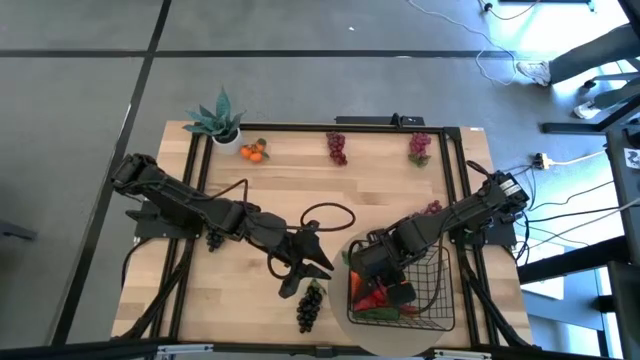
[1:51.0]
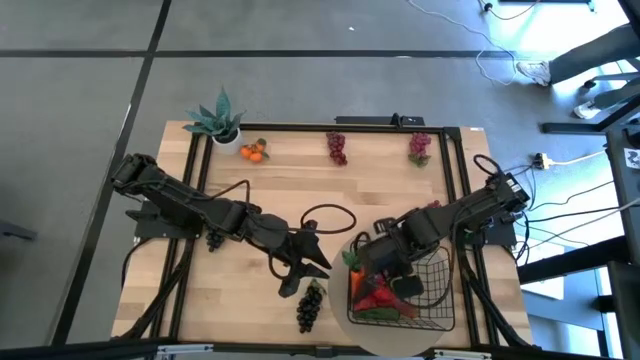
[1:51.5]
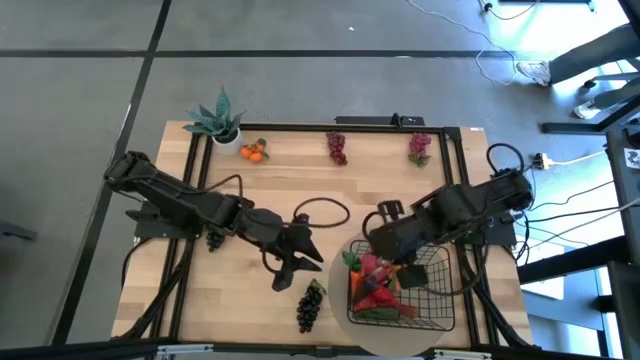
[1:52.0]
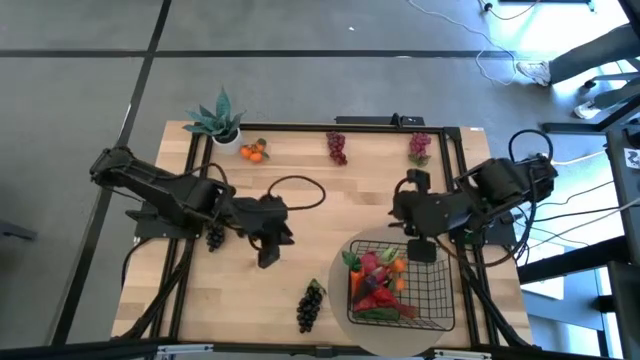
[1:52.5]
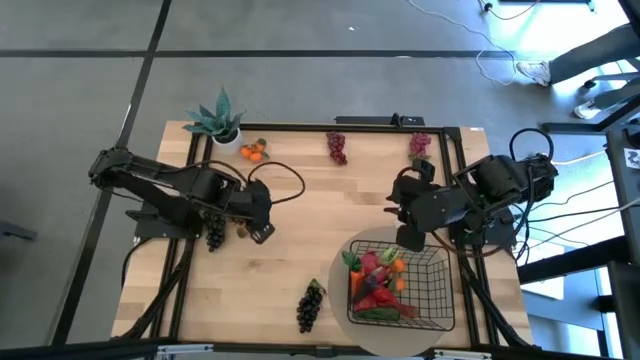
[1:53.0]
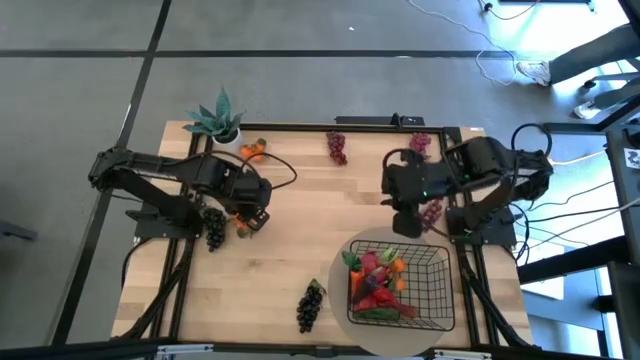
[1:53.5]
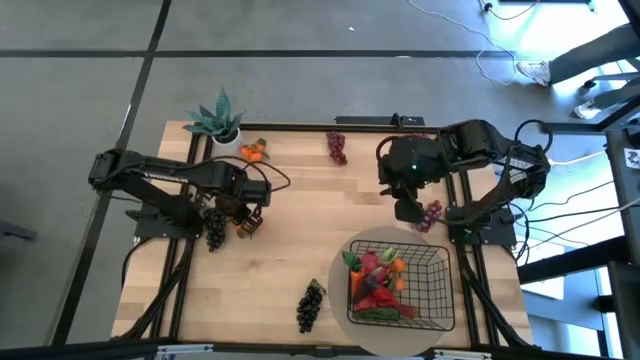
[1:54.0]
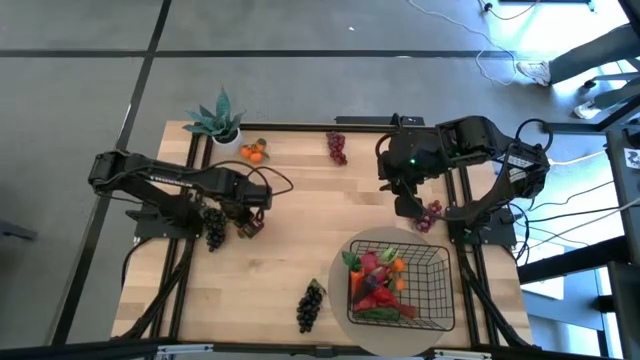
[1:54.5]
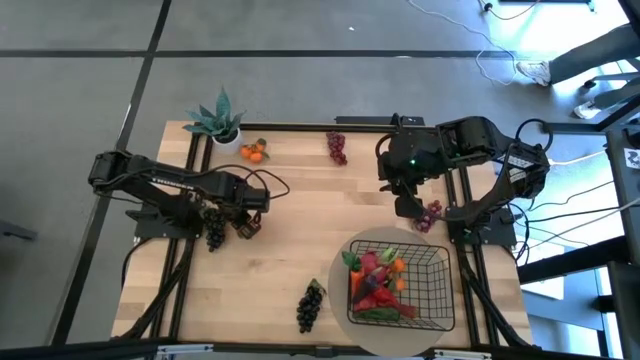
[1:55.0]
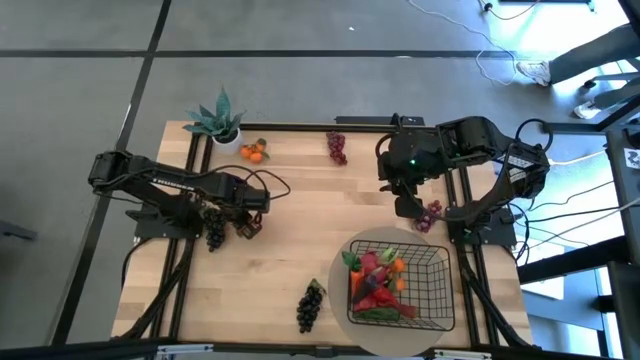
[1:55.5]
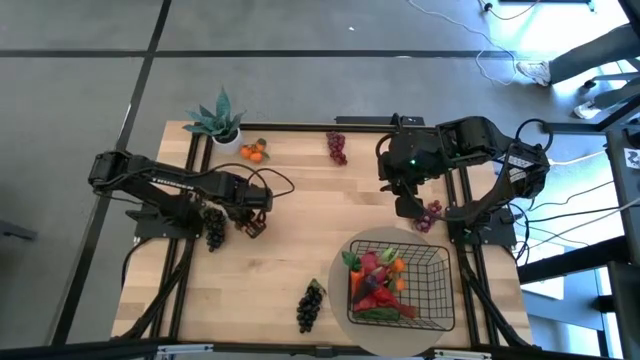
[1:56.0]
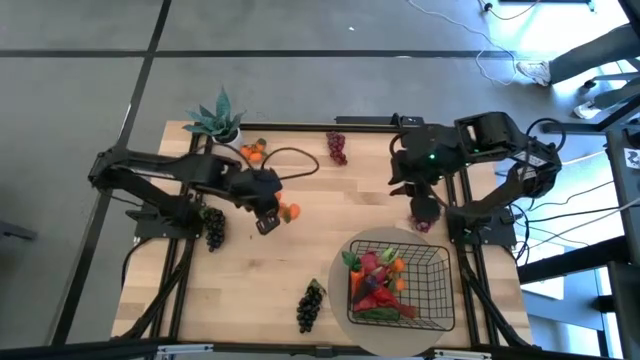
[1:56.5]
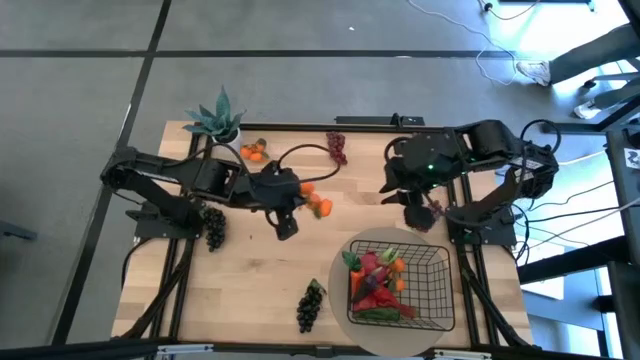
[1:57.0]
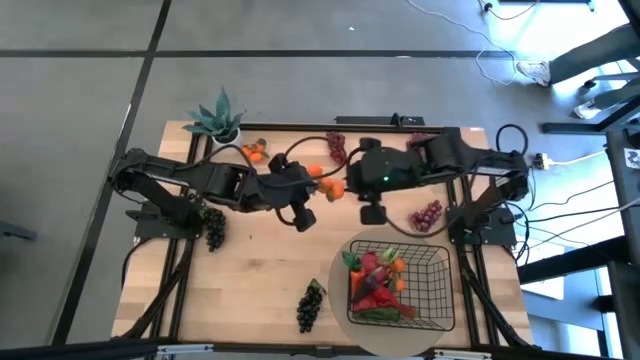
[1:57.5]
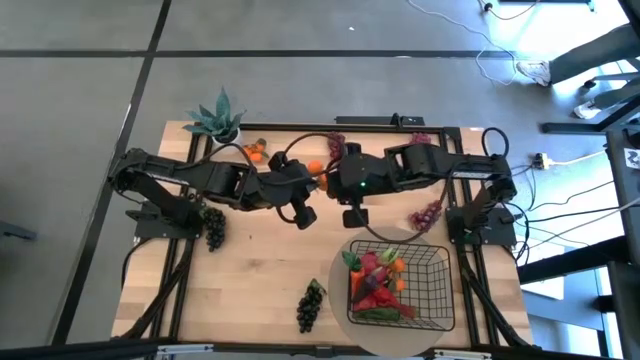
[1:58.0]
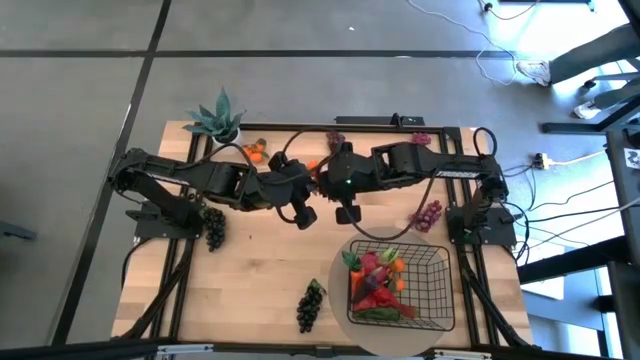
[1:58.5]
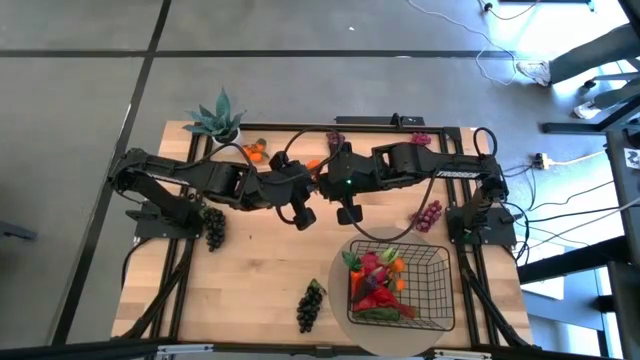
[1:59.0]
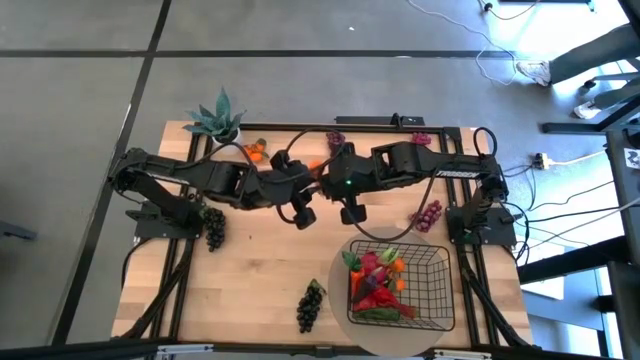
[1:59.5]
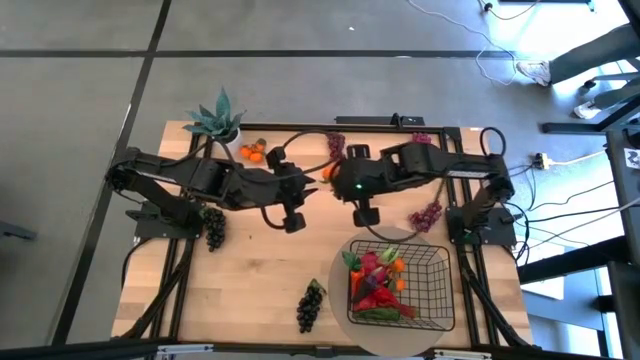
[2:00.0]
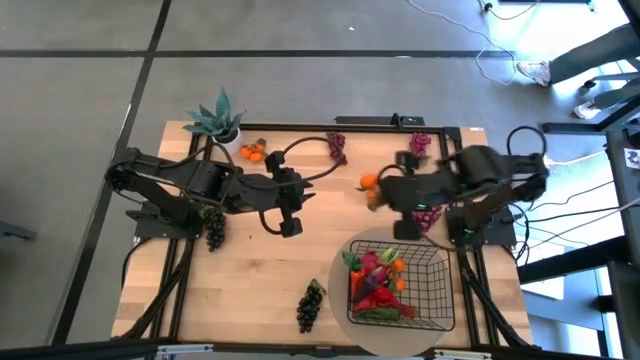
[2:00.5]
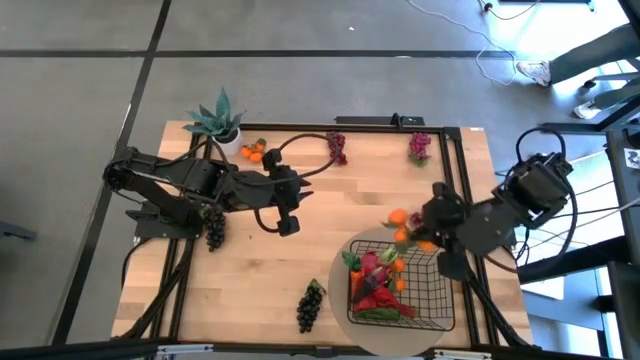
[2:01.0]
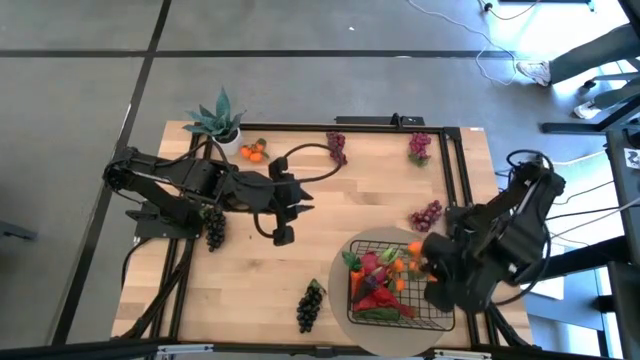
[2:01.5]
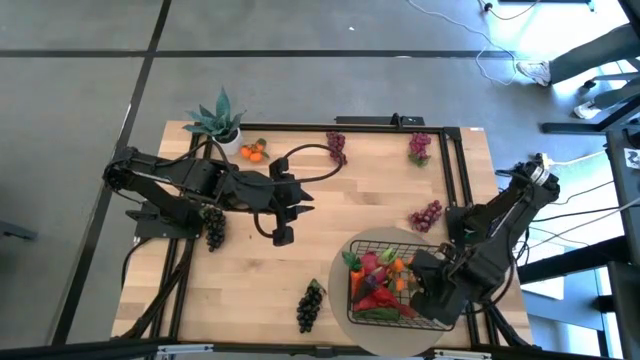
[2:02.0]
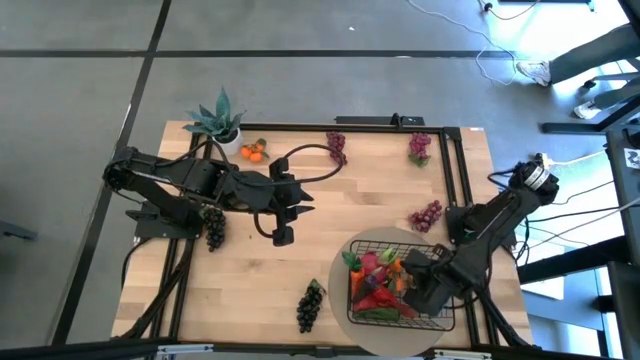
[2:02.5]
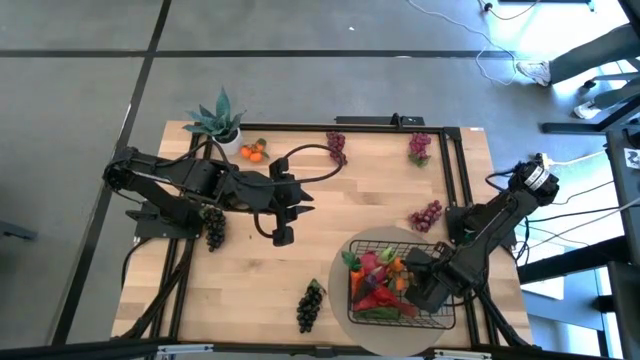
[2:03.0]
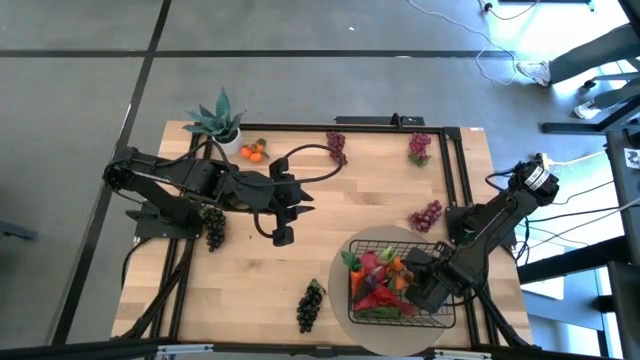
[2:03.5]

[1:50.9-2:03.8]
Task: Build produce basket
Put the bottom tangerines into the black wire basket

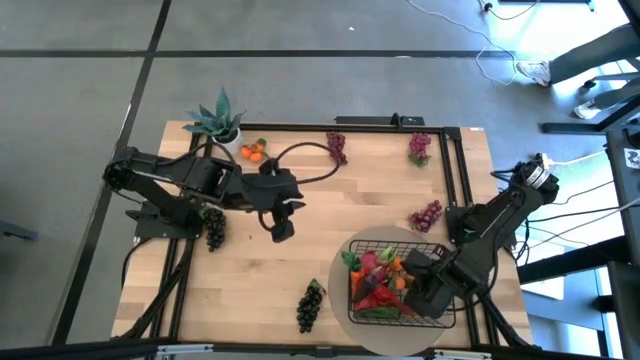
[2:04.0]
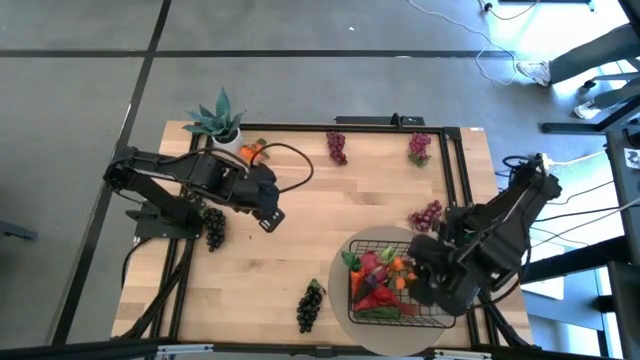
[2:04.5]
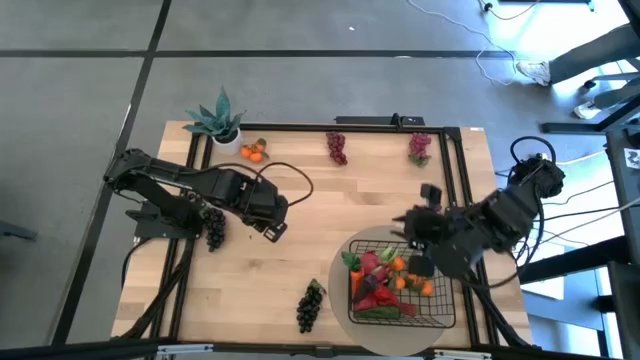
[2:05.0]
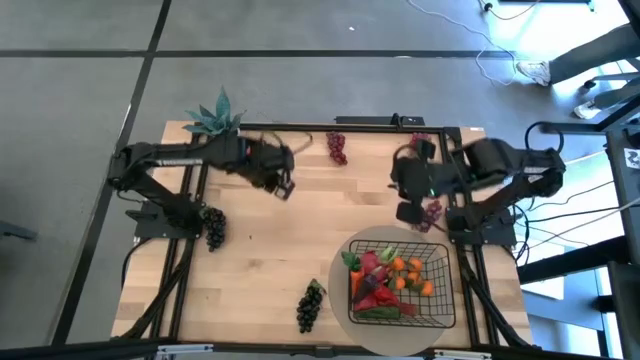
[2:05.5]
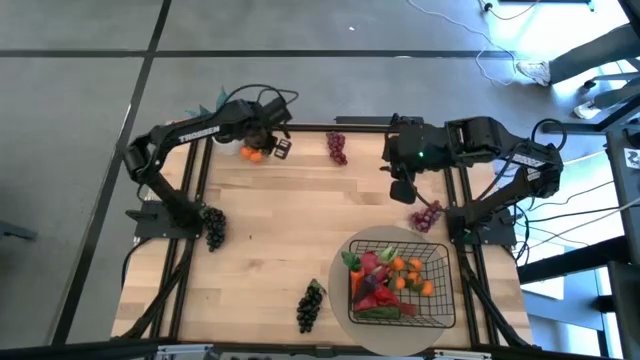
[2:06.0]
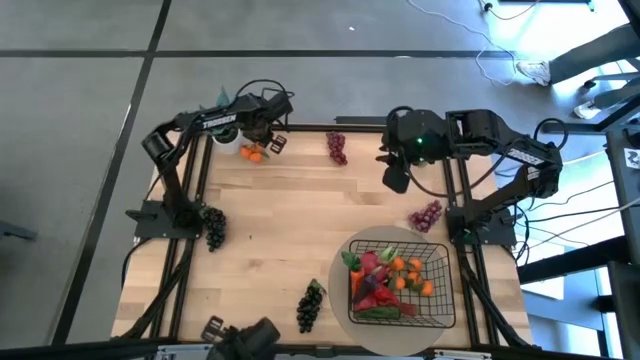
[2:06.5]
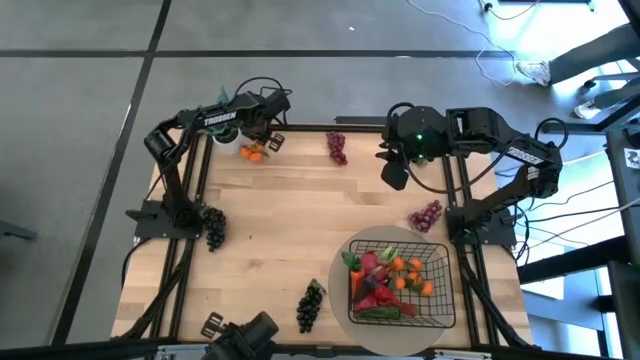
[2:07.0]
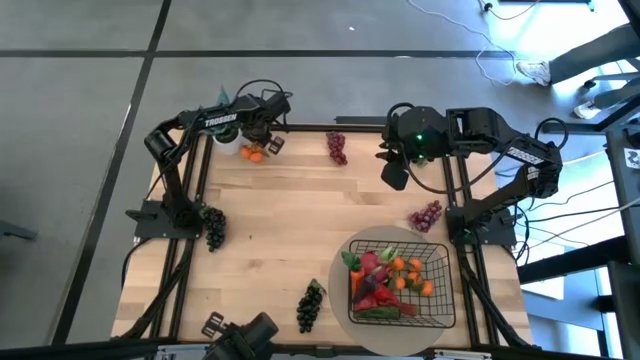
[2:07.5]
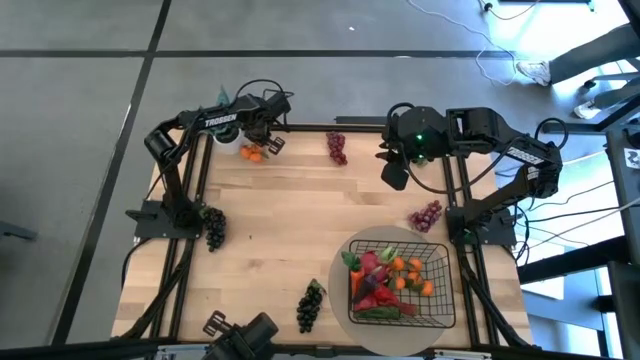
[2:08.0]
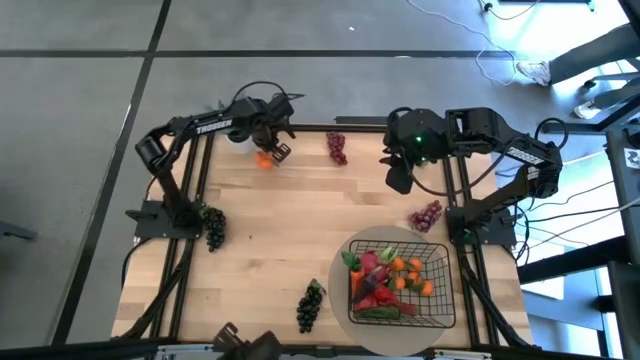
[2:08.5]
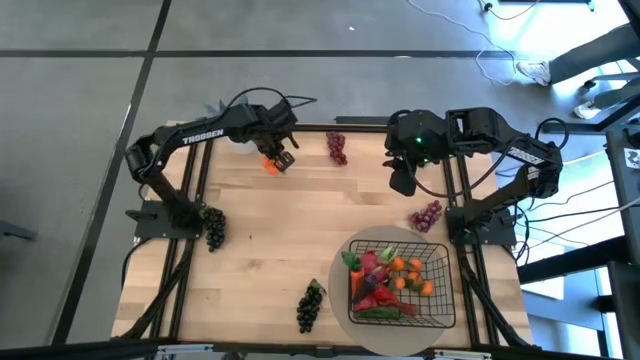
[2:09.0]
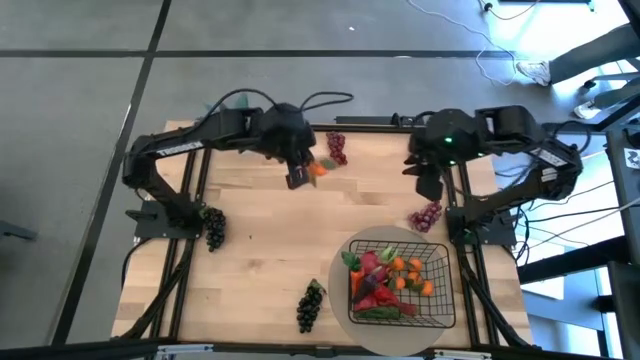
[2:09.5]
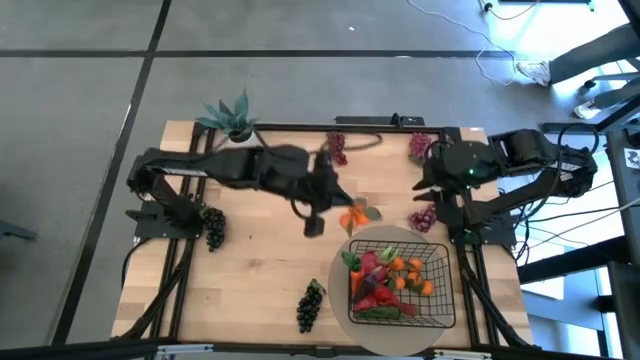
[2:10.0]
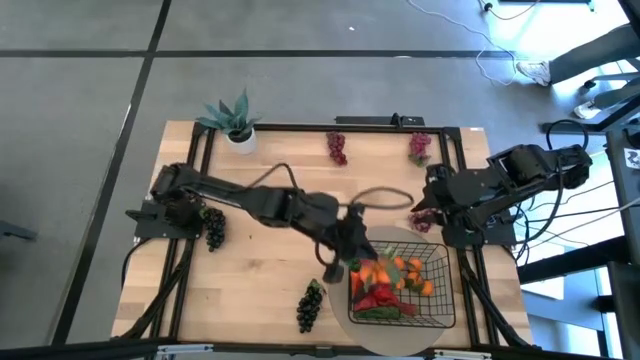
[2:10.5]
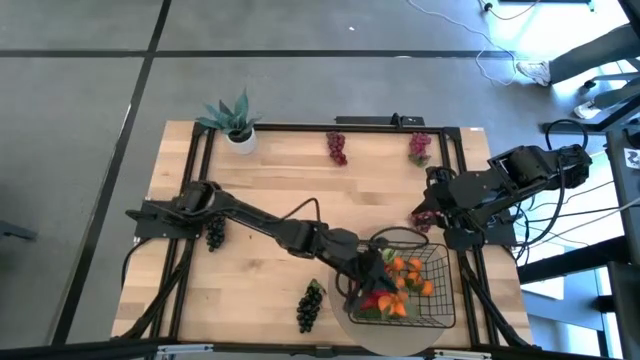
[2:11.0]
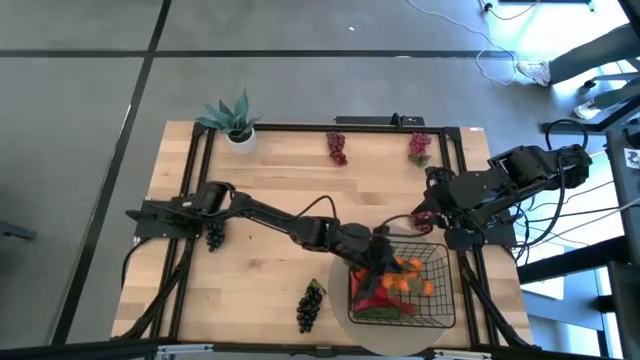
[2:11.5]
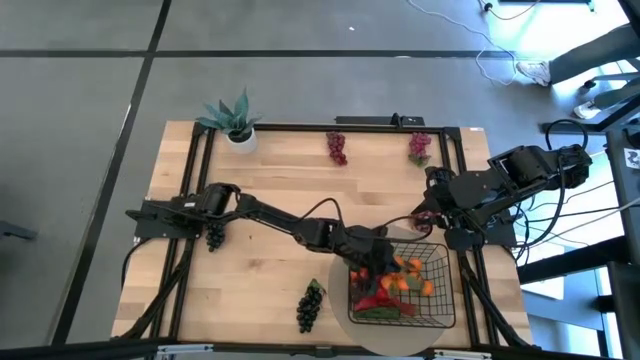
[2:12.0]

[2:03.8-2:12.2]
Put the tangerines into the black wire basket
